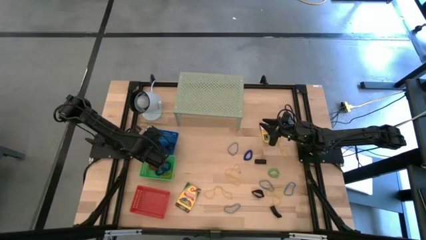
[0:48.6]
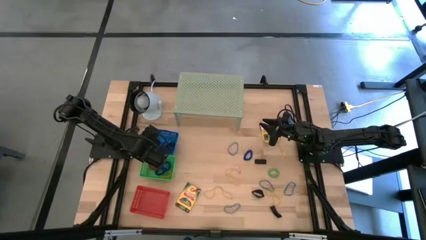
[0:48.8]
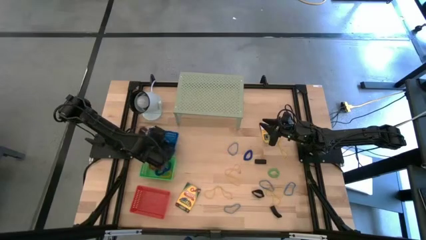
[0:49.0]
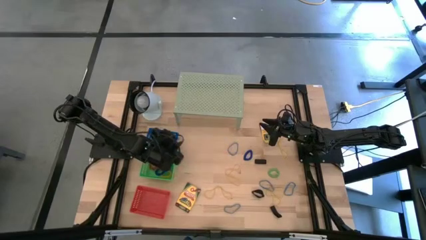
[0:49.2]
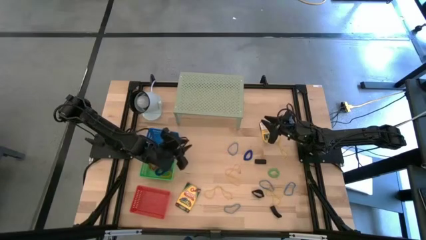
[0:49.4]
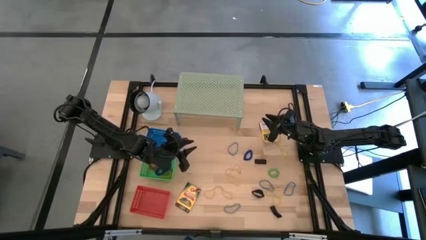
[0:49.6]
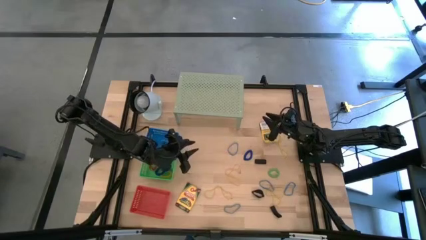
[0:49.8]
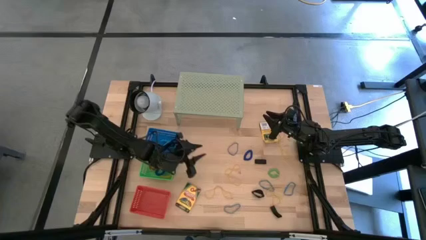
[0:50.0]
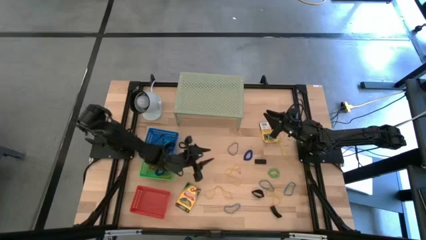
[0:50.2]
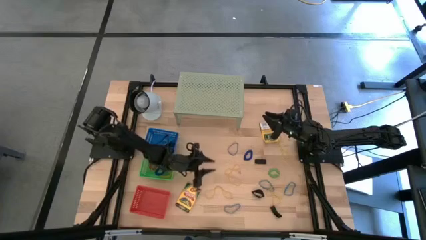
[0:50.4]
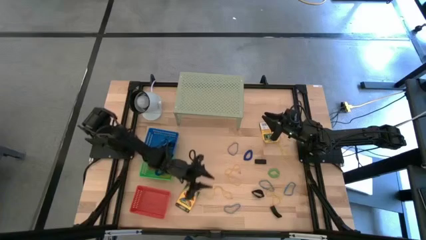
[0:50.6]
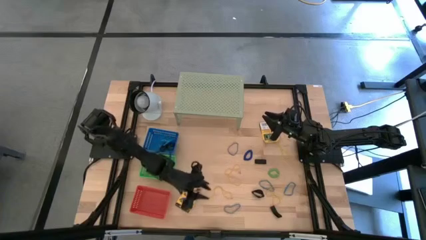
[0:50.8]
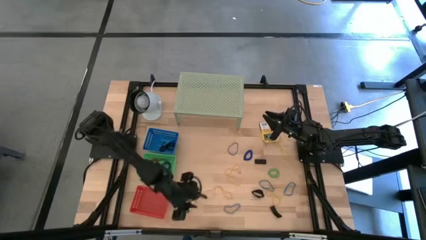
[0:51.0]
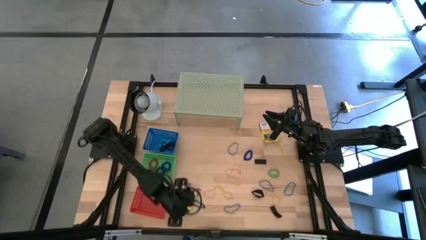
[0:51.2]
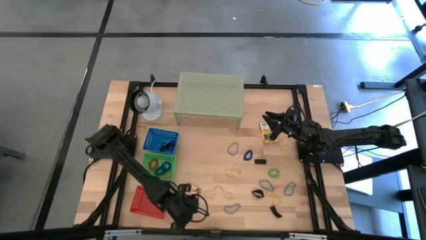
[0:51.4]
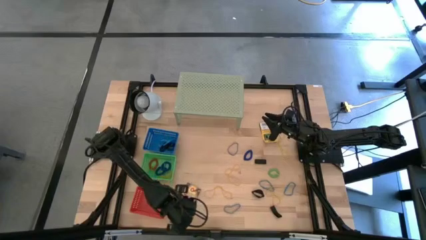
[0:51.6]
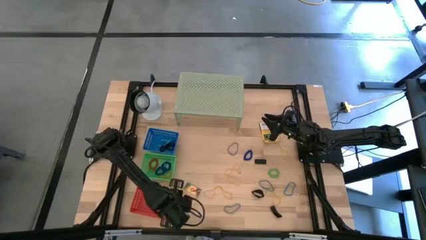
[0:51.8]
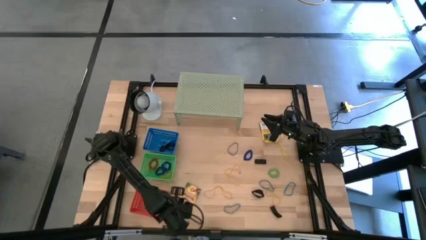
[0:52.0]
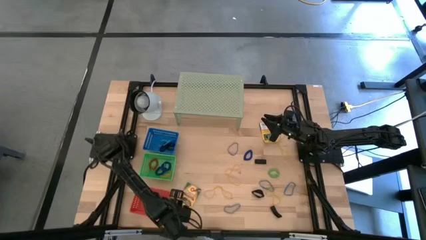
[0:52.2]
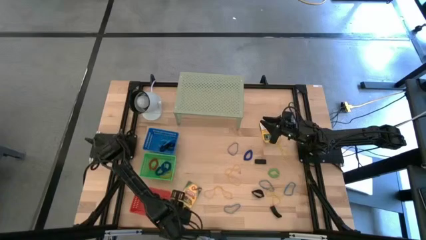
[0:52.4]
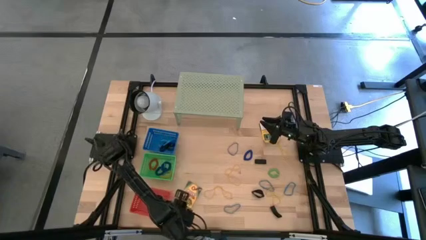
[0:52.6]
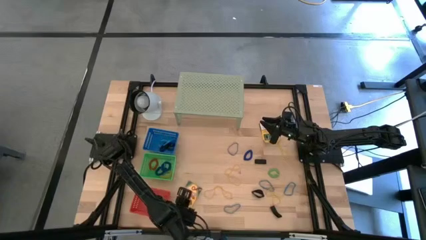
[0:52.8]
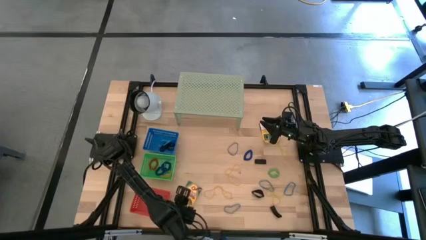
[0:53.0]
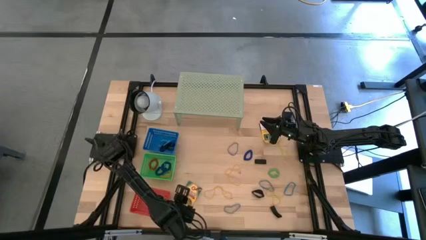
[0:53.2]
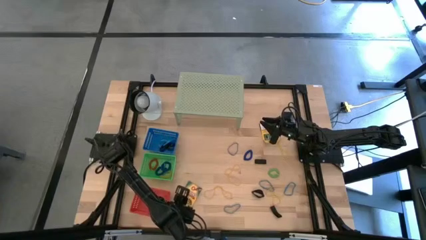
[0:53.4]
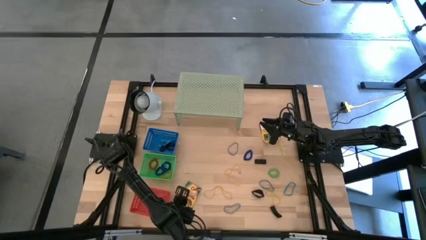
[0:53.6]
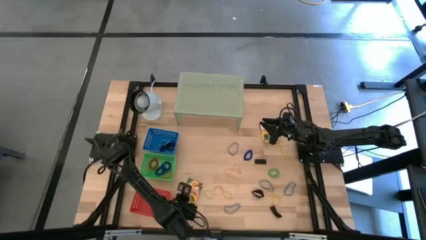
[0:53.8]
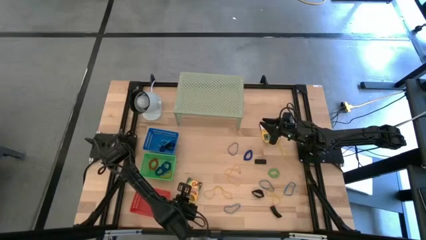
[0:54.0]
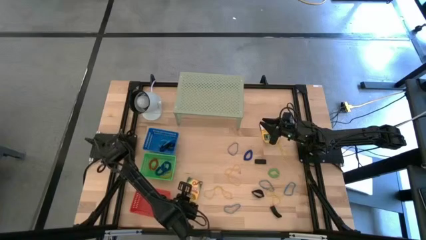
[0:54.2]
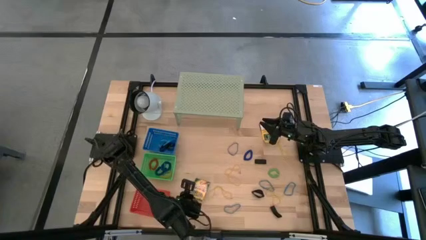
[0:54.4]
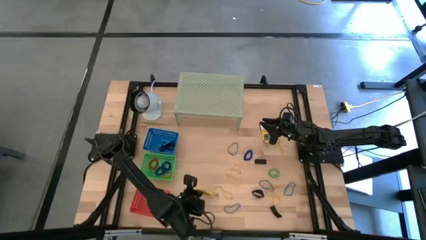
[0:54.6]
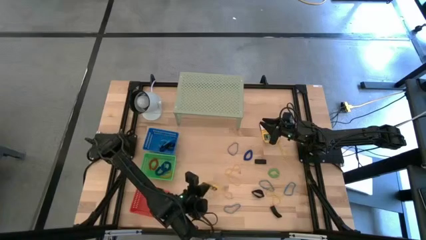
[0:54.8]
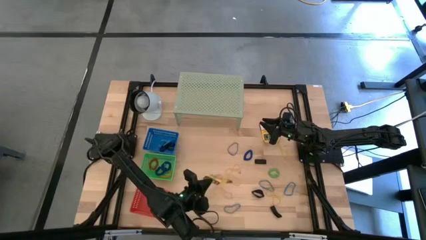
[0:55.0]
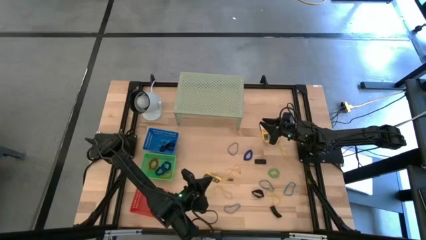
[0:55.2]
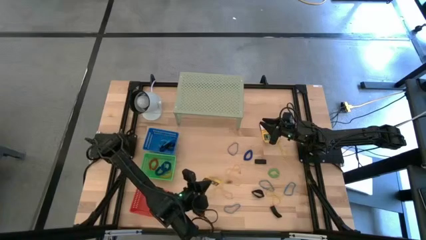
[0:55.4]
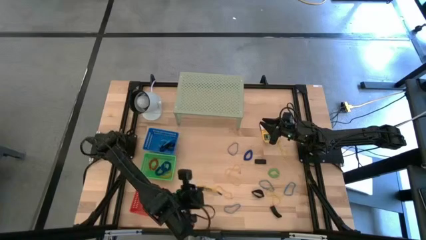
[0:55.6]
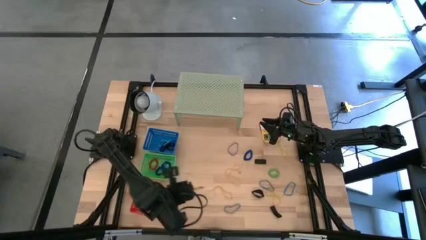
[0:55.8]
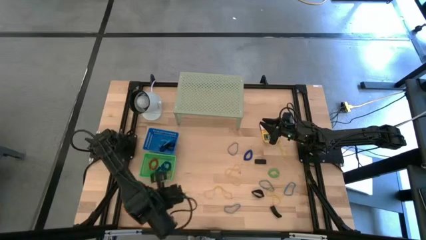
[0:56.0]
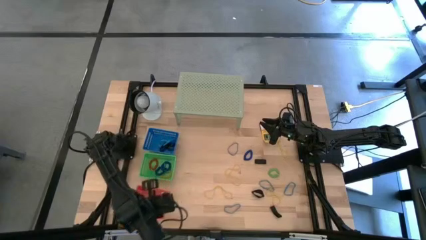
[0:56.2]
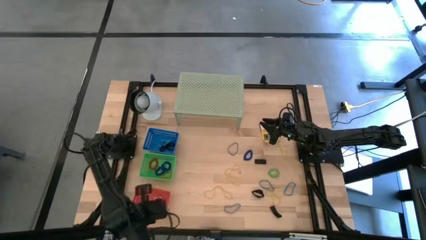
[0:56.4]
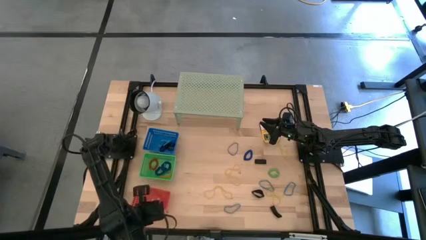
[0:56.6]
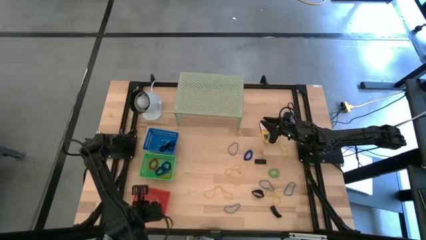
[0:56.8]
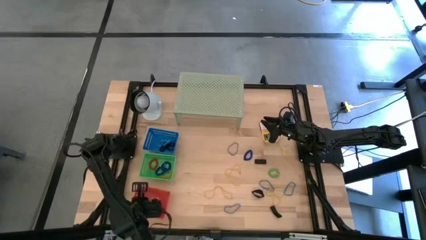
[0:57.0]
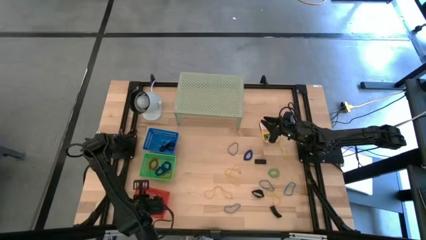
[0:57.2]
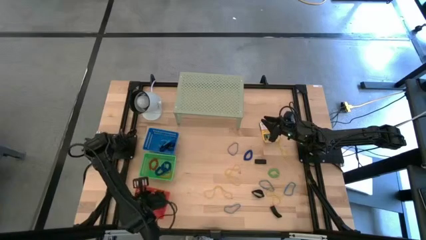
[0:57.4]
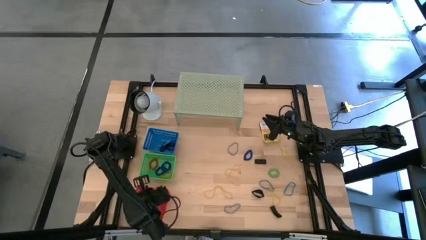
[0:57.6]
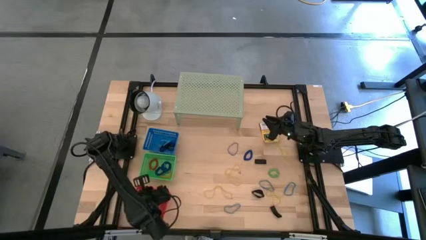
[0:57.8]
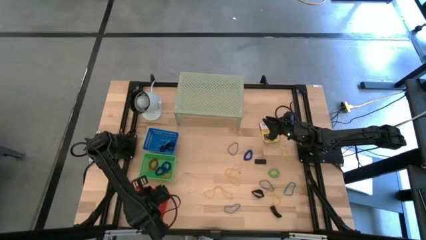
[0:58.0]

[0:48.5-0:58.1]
Task: Pick & Place Office Desk Supplies
Put the yellow crayon box into the red bin

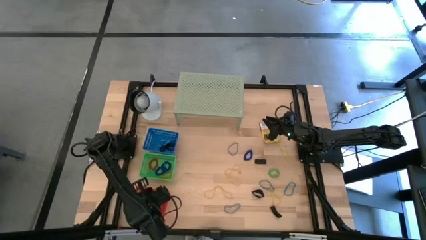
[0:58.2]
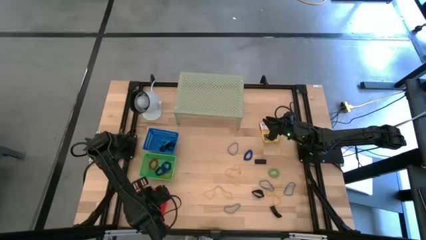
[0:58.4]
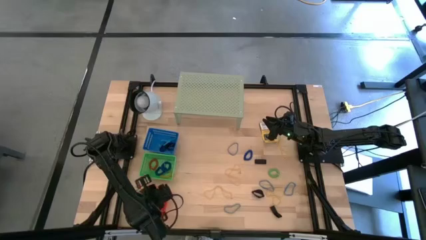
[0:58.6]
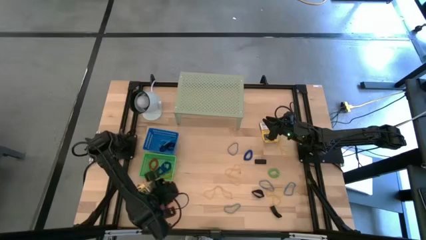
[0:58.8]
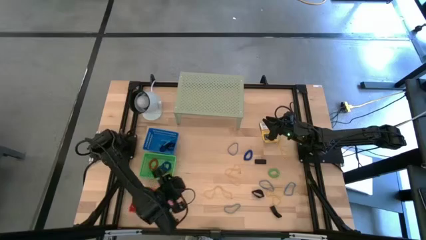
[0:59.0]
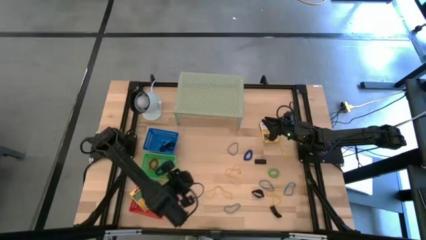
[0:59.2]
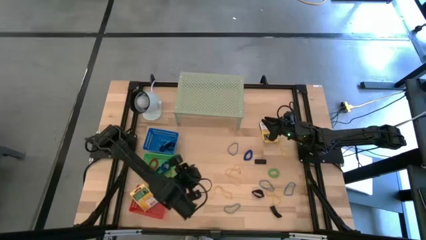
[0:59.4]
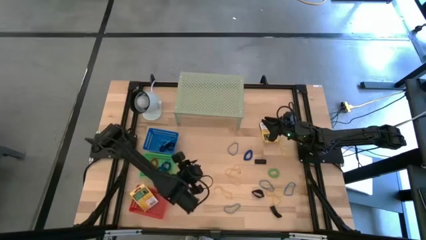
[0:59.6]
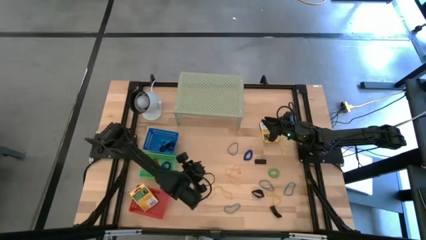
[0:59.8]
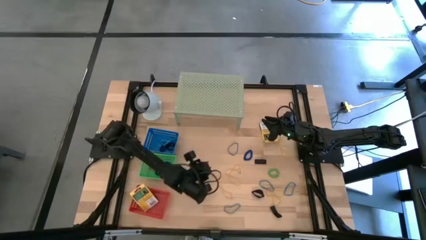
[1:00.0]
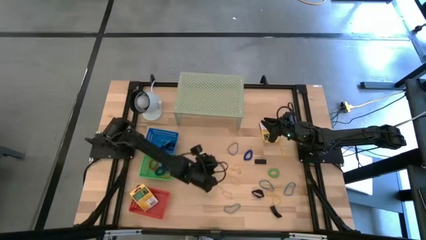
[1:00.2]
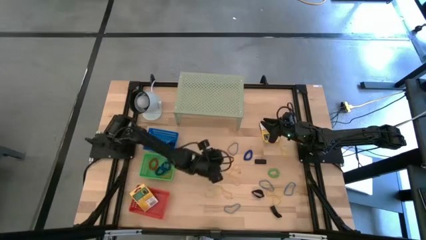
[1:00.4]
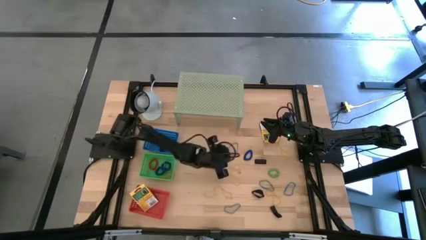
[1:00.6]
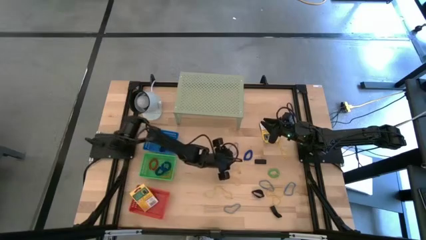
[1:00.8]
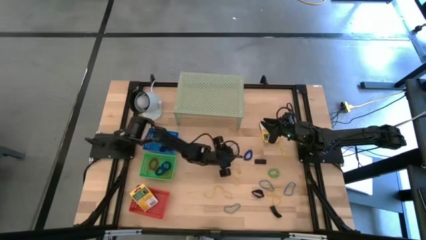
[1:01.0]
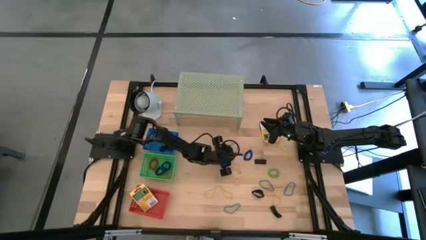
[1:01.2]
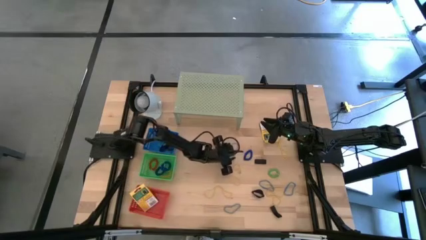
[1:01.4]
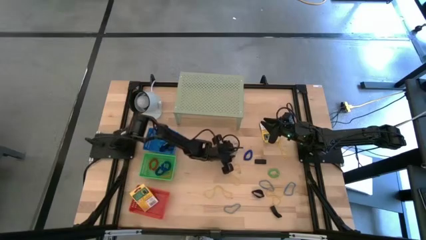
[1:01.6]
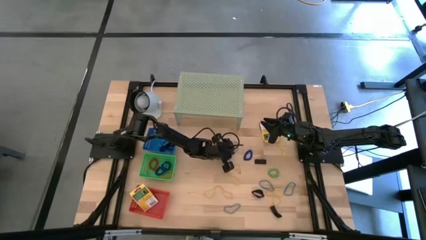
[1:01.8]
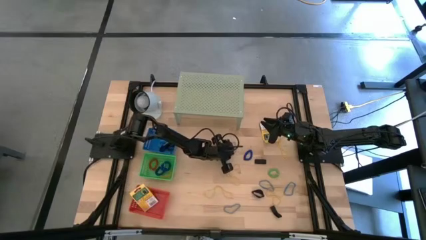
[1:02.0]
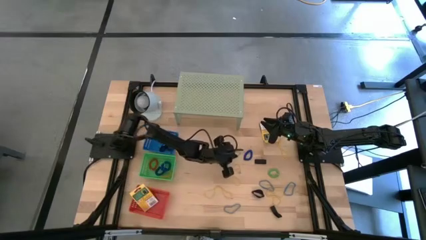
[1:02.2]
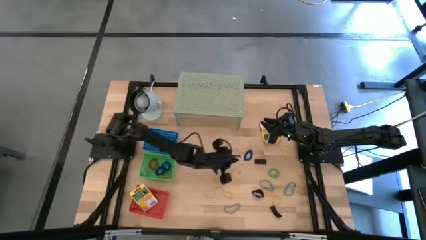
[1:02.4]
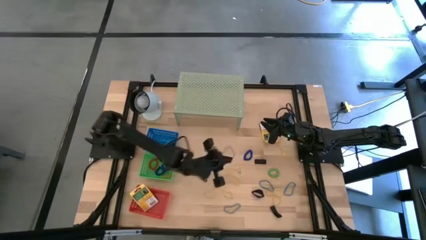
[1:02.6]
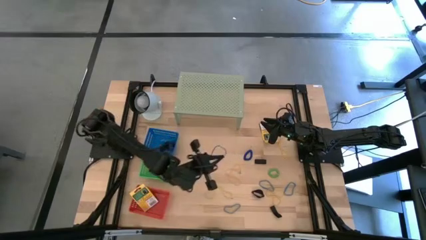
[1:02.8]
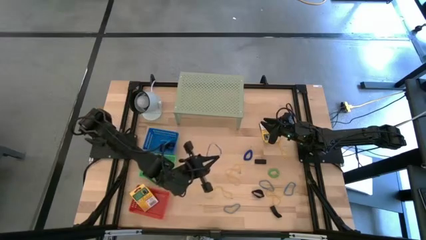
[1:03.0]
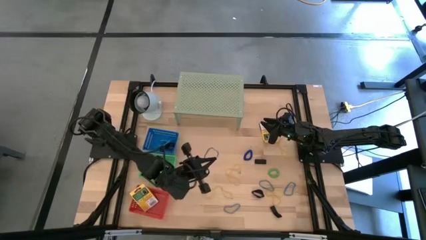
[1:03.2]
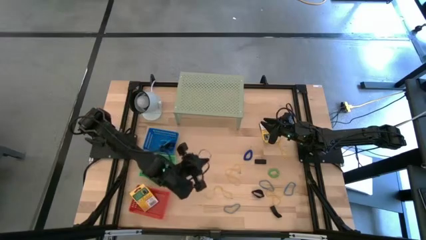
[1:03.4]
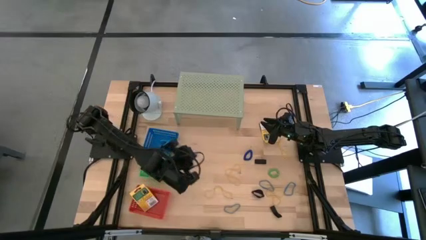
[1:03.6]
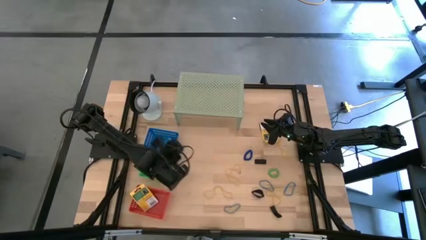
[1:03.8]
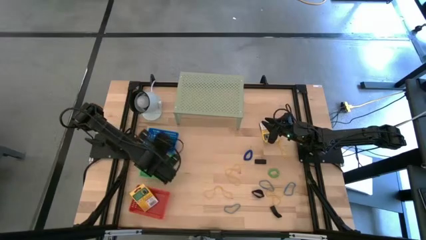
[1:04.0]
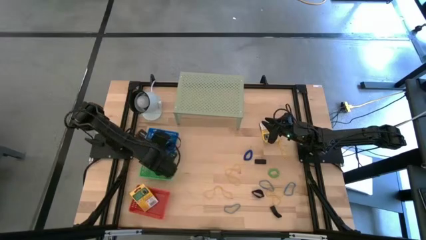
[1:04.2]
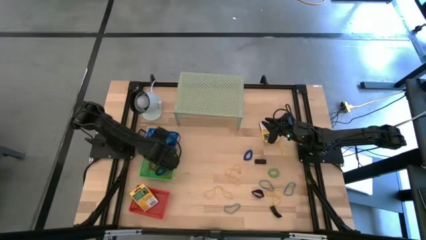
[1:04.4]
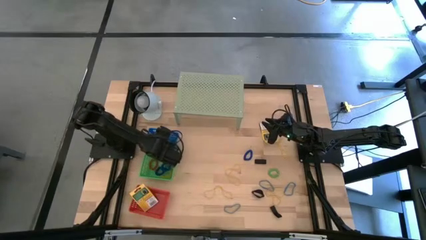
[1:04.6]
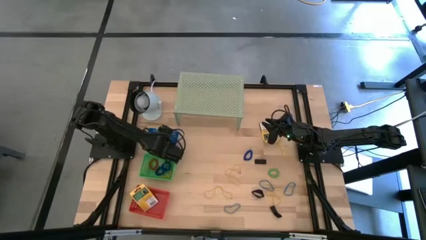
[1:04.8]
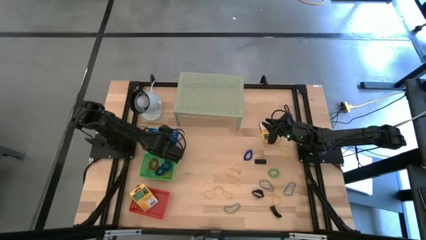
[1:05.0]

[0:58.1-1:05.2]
Put the blue rubber band into the blue bin
